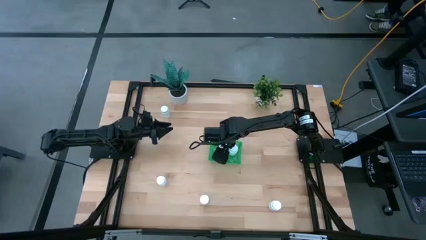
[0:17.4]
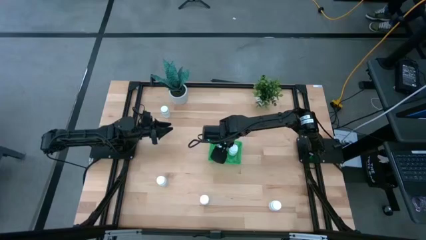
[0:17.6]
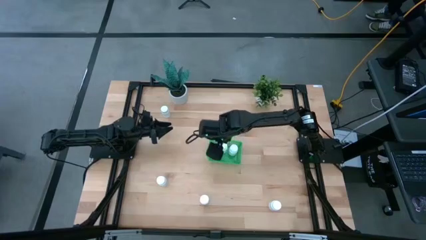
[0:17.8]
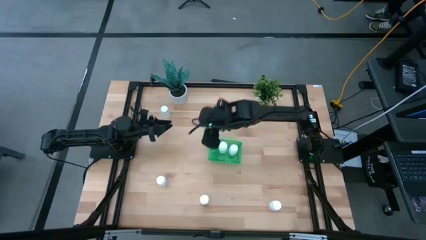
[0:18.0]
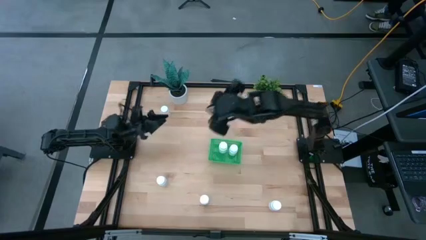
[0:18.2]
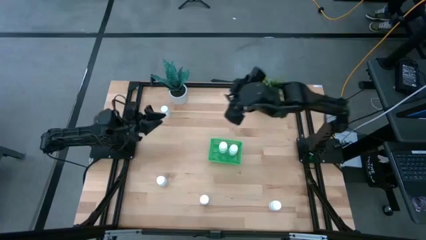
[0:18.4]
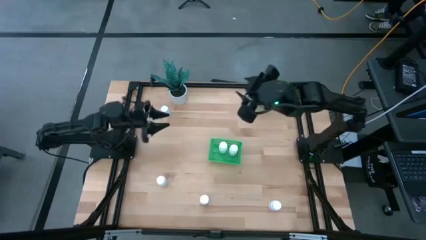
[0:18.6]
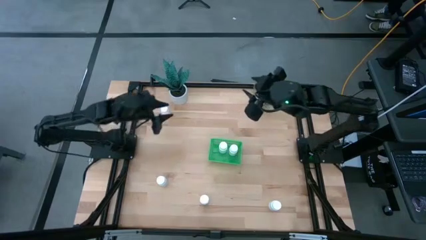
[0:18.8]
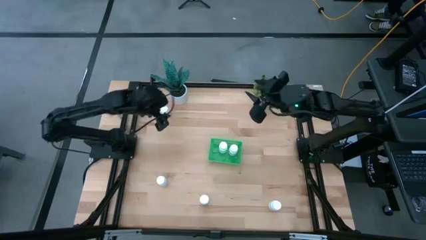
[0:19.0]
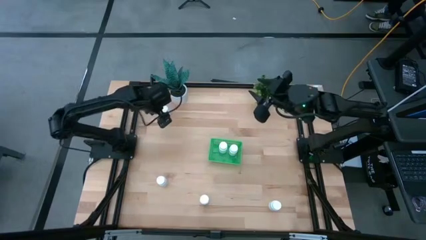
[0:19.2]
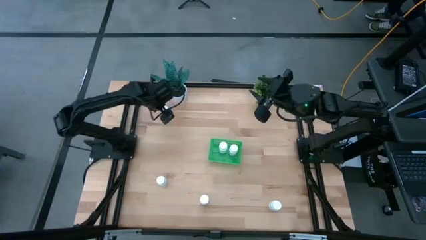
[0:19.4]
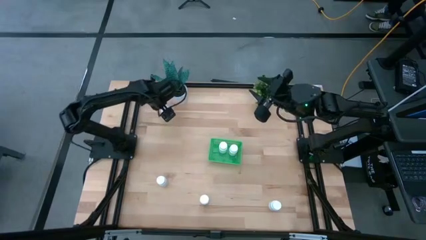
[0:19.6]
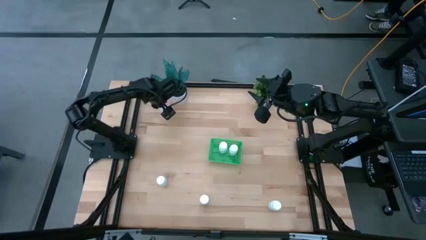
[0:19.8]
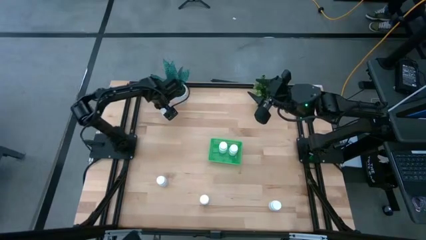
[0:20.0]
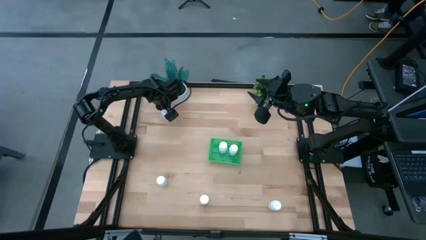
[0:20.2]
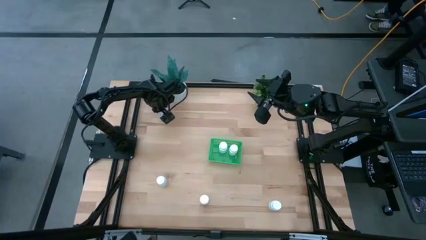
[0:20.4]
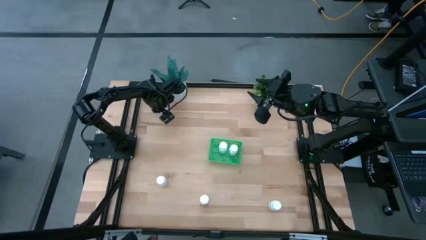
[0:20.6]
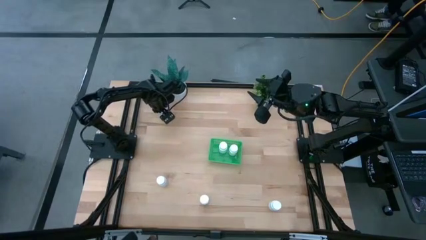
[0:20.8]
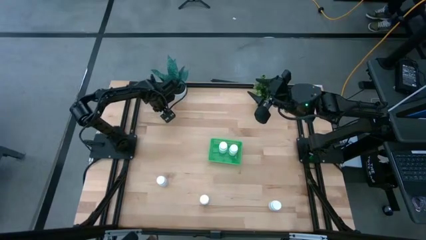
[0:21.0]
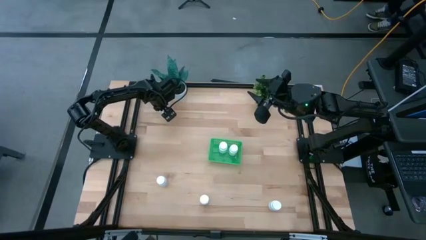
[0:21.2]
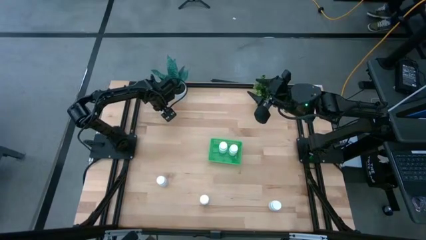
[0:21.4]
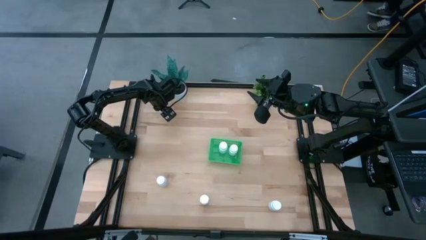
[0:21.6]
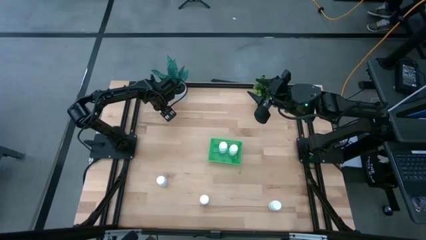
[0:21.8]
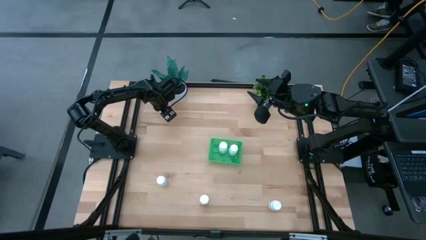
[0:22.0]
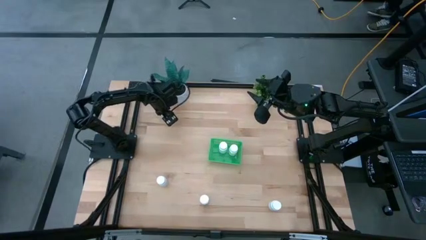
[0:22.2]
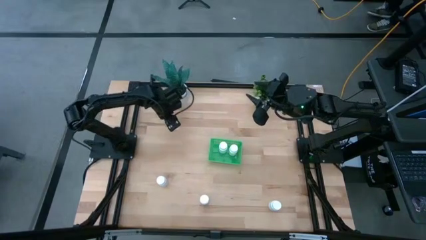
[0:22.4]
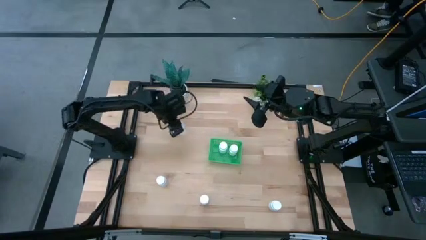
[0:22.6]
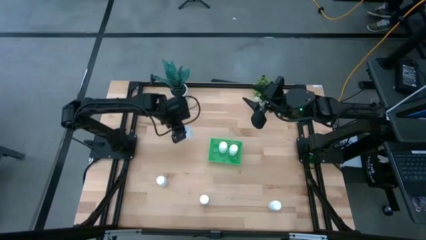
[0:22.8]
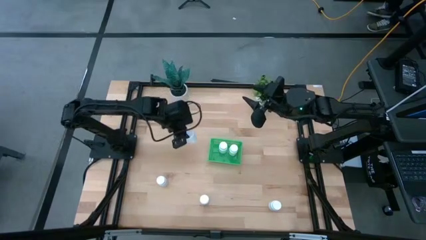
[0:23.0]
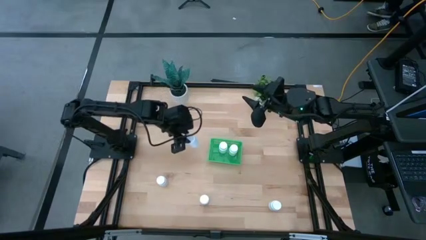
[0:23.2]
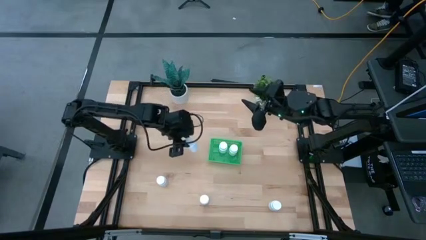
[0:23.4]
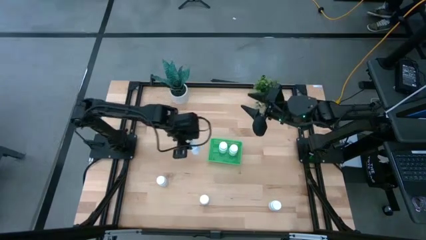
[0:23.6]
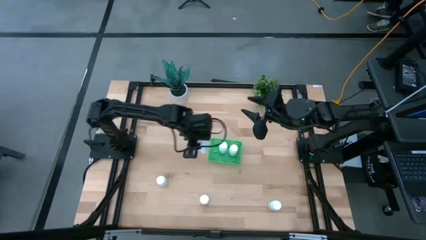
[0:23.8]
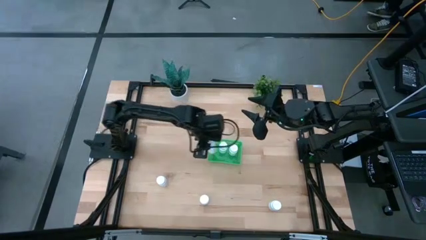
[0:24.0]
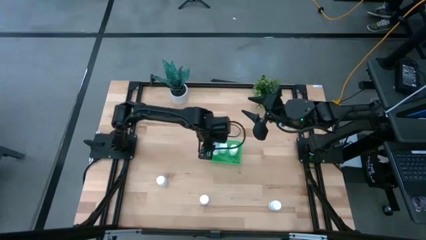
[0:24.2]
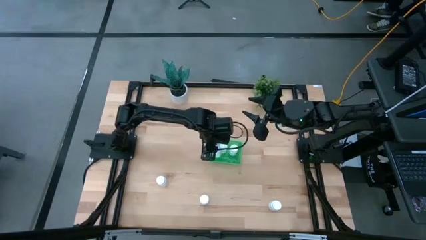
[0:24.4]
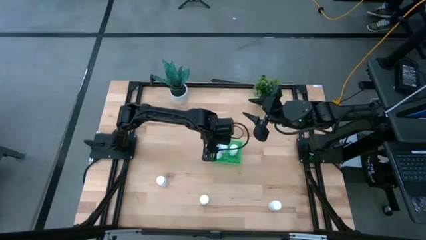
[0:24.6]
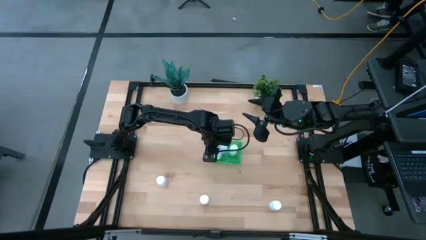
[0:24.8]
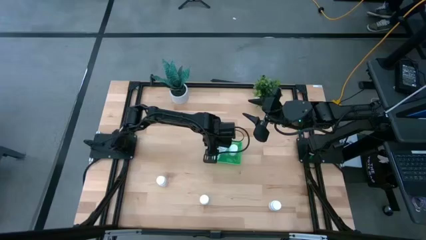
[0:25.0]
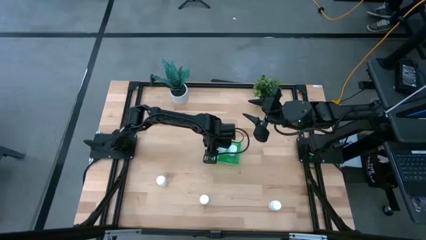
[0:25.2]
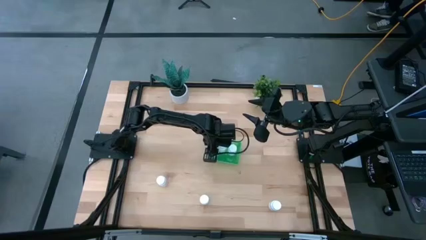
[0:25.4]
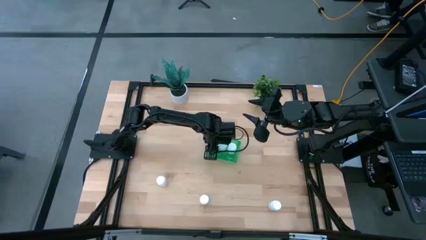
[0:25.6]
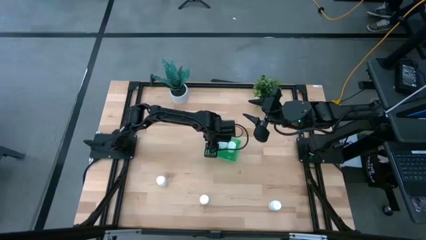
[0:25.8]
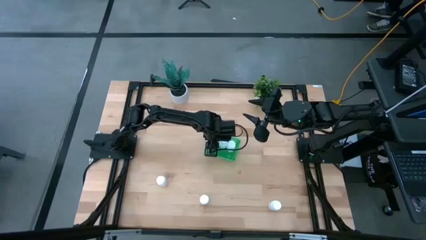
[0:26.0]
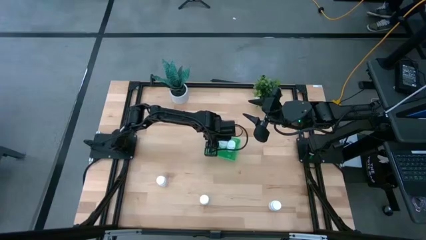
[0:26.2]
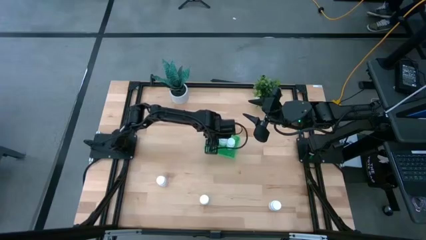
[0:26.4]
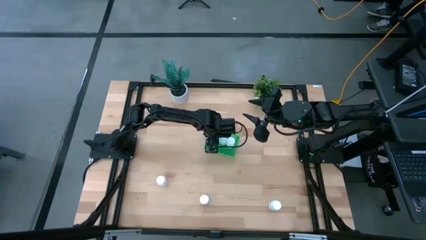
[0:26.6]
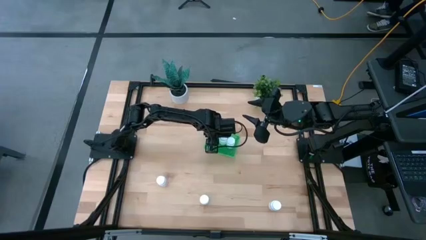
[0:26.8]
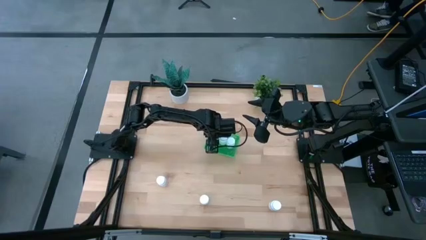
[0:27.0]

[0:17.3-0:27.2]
Task: Pick and place pill bottles into a basket
Put the top medicine bottle into the green basket

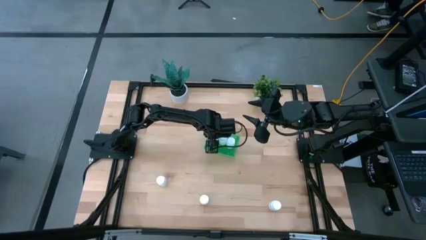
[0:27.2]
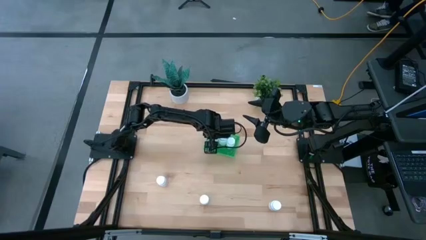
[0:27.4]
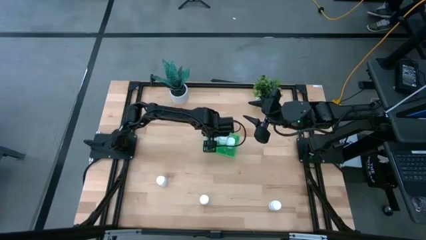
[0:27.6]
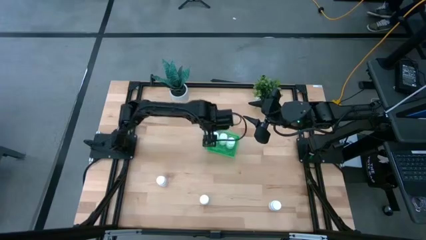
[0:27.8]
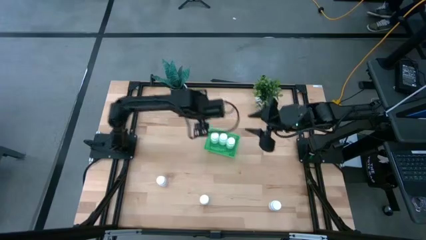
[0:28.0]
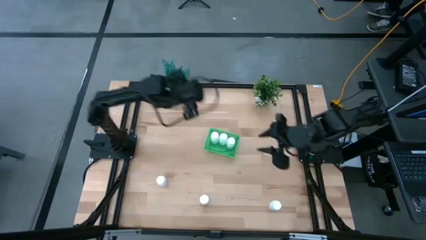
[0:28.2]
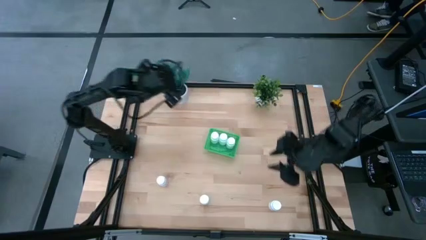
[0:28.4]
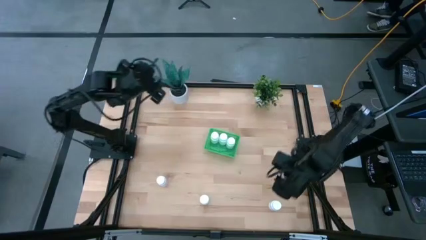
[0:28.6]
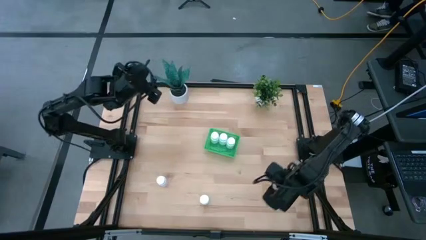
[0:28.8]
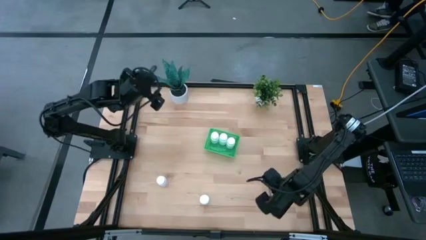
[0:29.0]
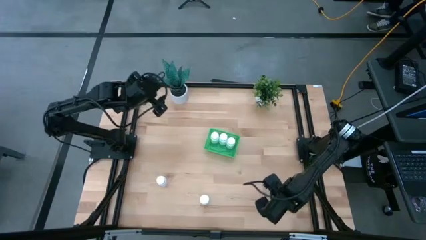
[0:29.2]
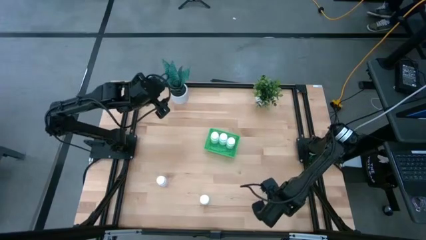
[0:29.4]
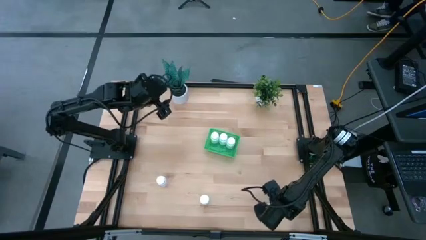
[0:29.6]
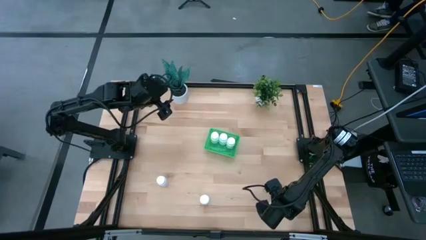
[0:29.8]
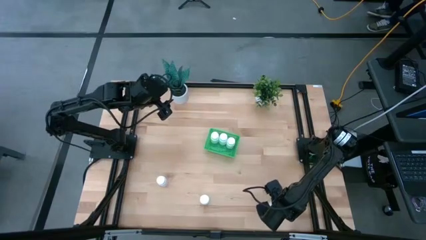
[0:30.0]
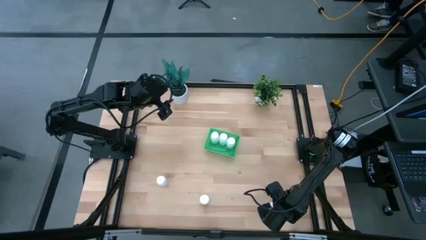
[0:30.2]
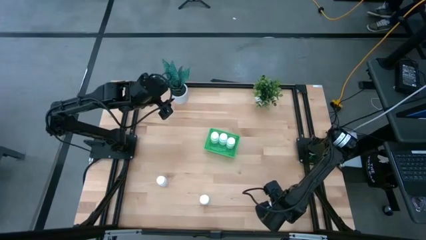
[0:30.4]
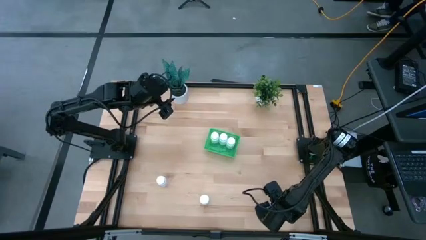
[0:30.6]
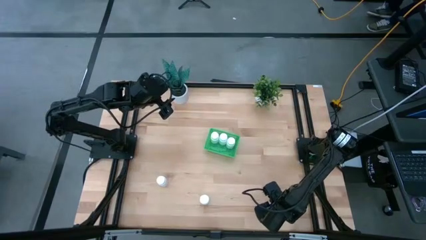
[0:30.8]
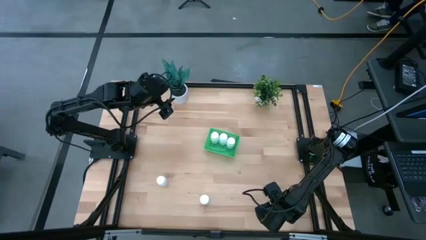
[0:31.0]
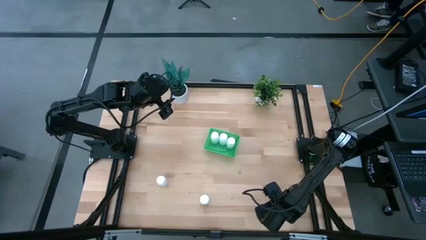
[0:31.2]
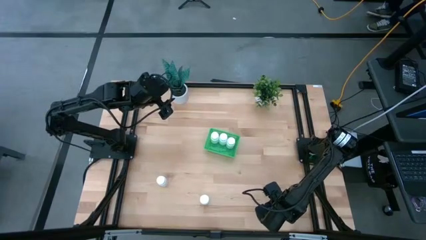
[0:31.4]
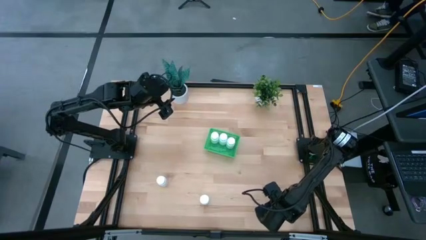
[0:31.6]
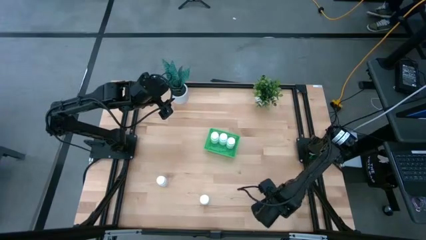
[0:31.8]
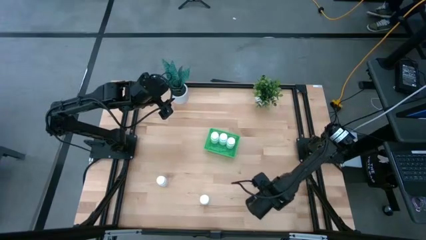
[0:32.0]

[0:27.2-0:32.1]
Put the bottom right medicine bottle into the green basket

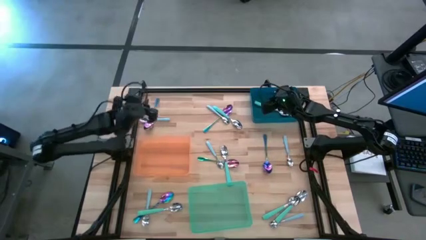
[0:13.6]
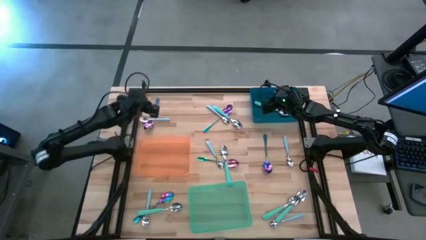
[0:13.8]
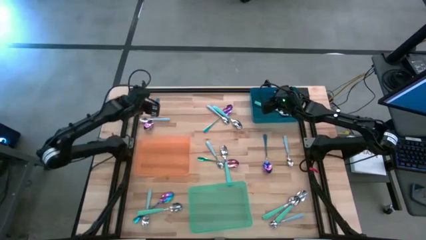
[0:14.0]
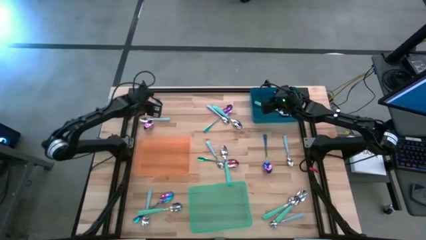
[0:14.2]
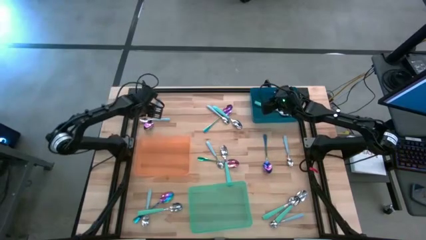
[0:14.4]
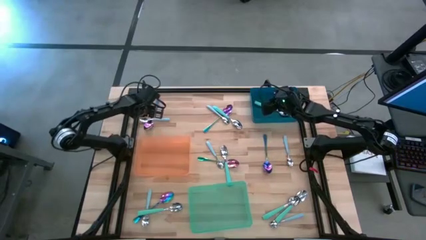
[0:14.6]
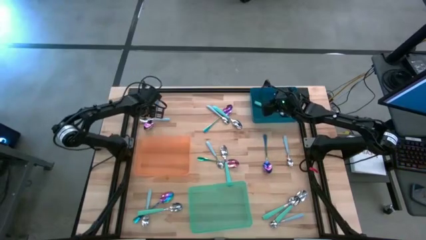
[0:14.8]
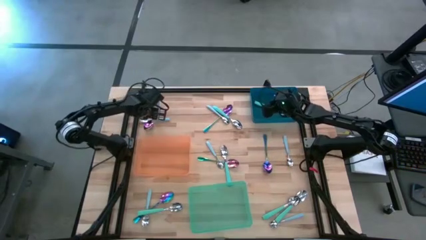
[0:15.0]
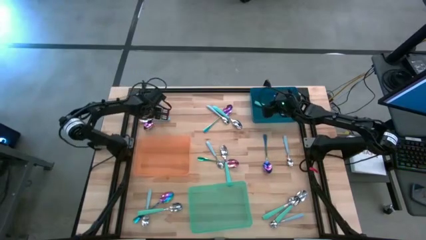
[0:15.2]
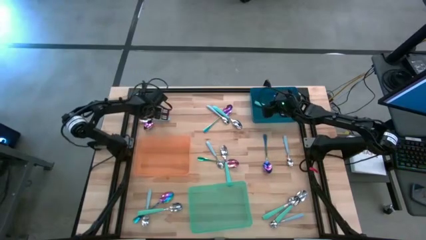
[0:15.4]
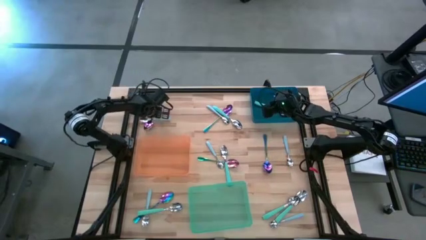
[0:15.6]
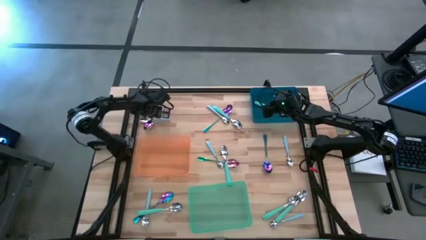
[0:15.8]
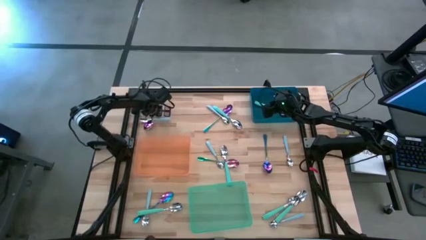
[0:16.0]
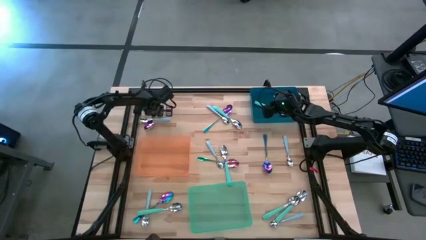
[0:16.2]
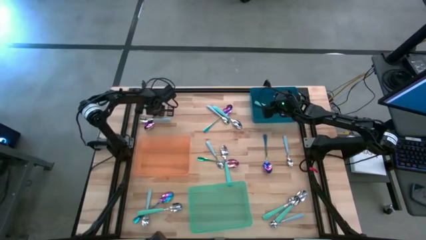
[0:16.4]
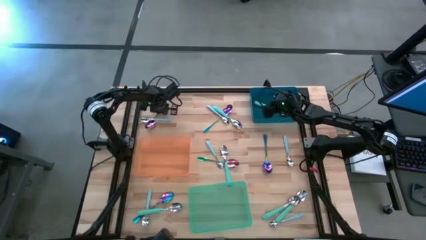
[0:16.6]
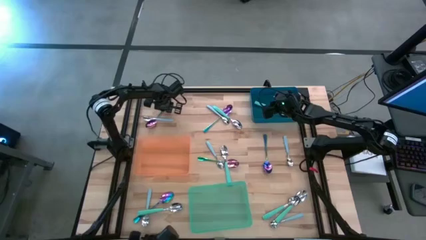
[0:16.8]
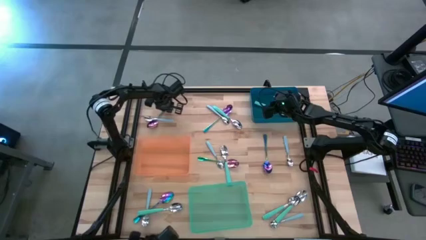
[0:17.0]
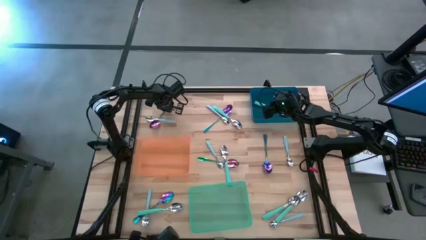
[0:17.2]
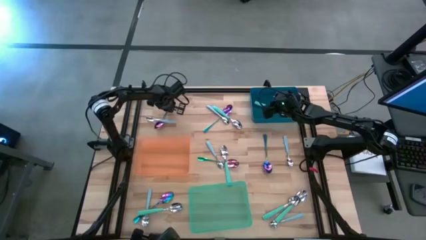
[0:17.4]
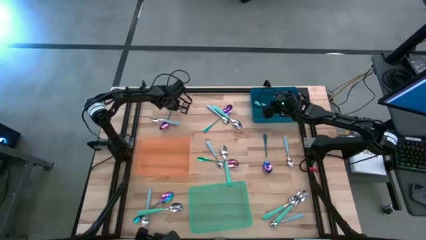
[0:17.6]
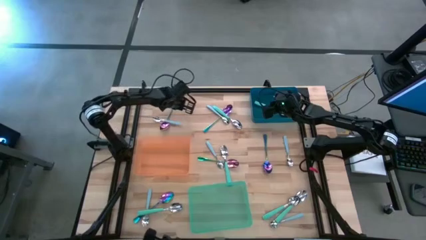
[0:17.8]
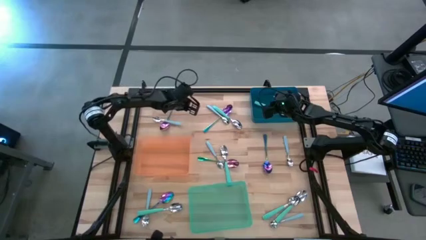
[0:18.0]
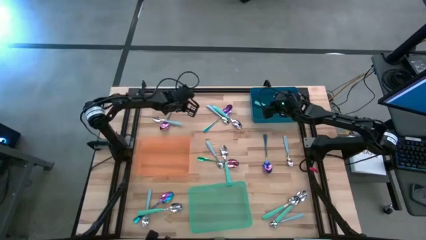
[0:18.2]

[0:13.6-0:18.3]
Task: Sort silverware by color (type)
Put the top left purple spoon into the green bin
